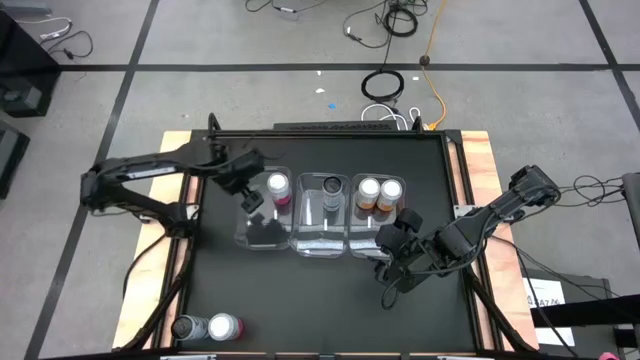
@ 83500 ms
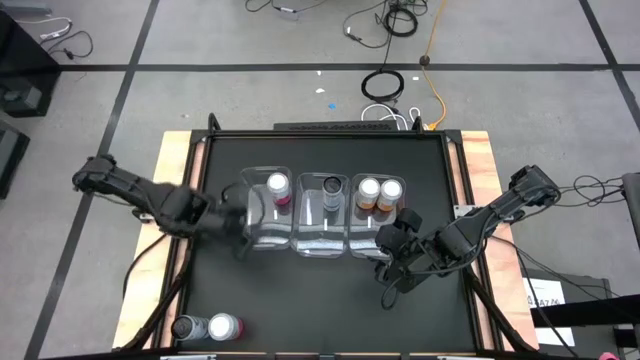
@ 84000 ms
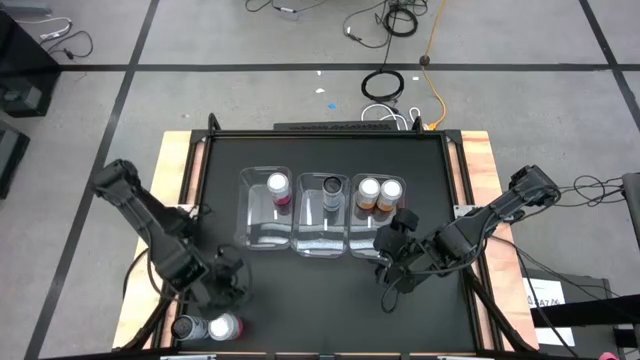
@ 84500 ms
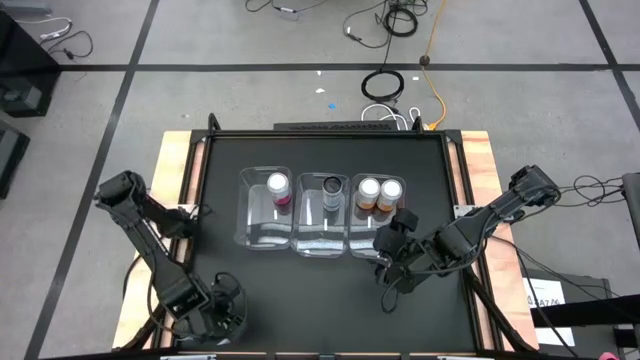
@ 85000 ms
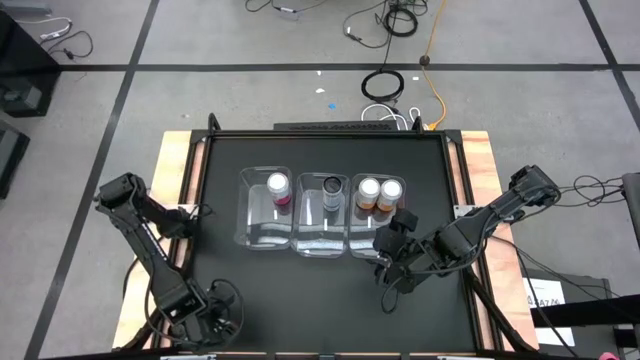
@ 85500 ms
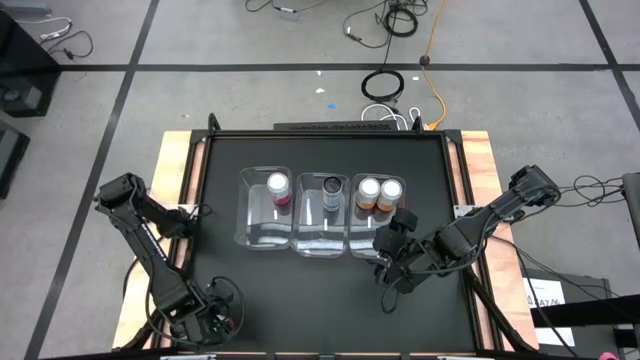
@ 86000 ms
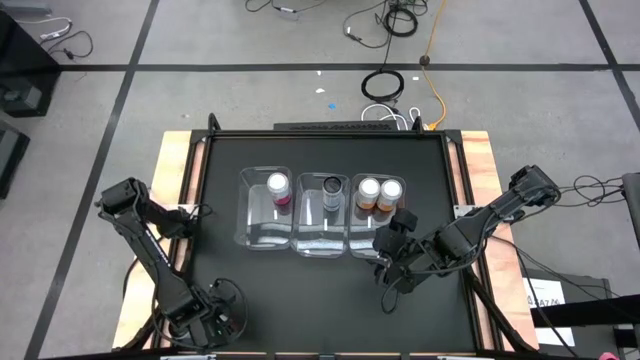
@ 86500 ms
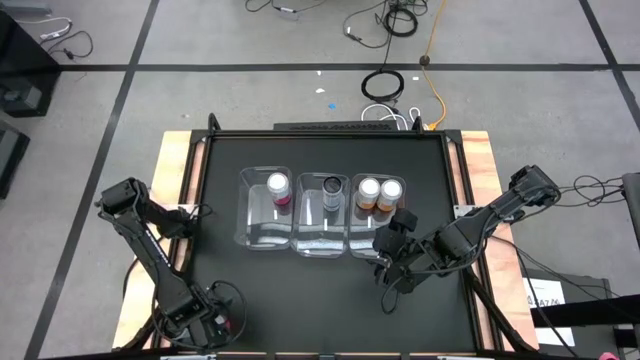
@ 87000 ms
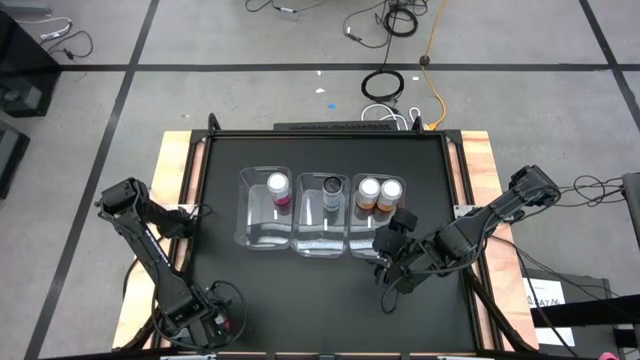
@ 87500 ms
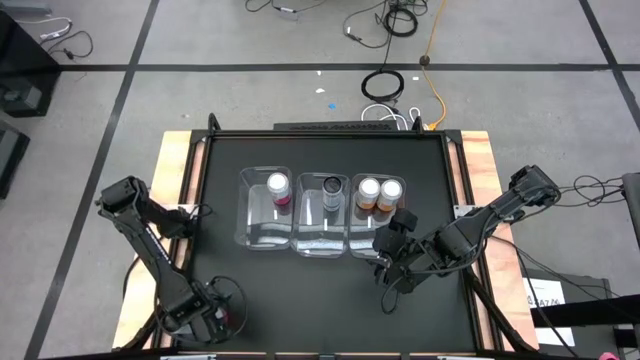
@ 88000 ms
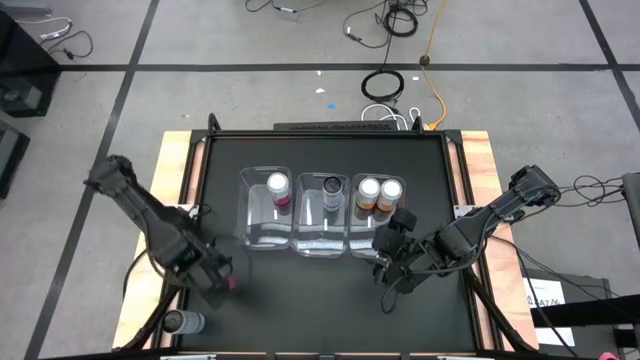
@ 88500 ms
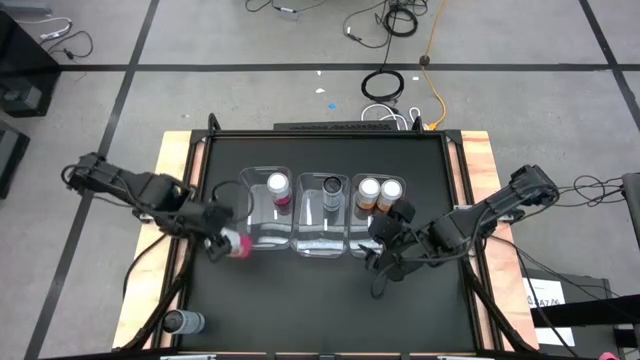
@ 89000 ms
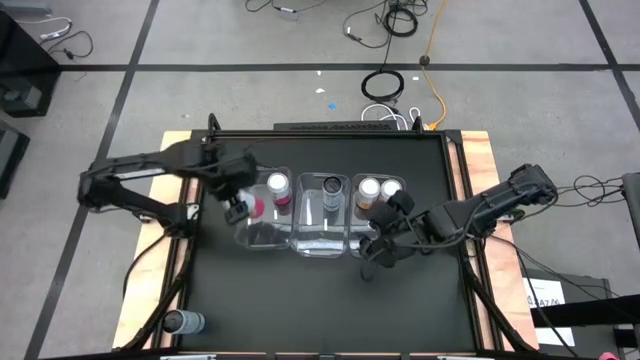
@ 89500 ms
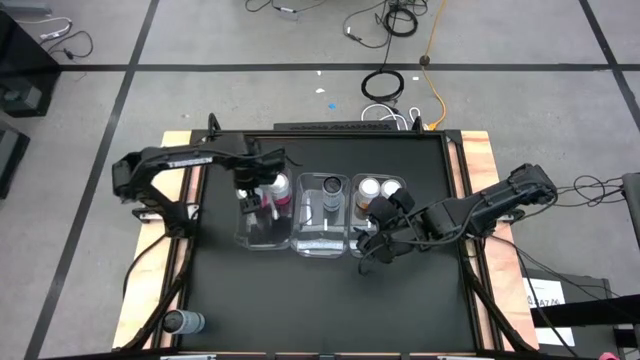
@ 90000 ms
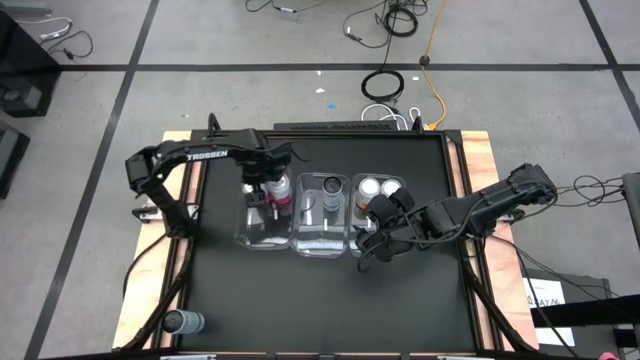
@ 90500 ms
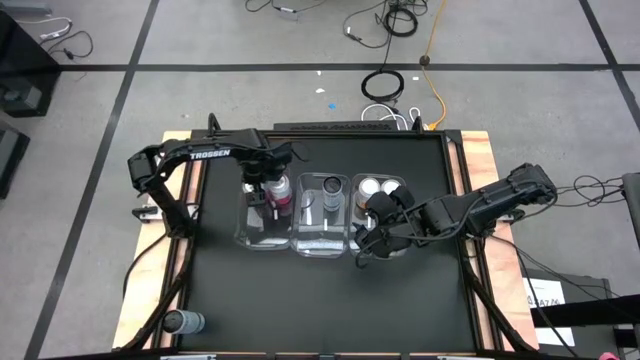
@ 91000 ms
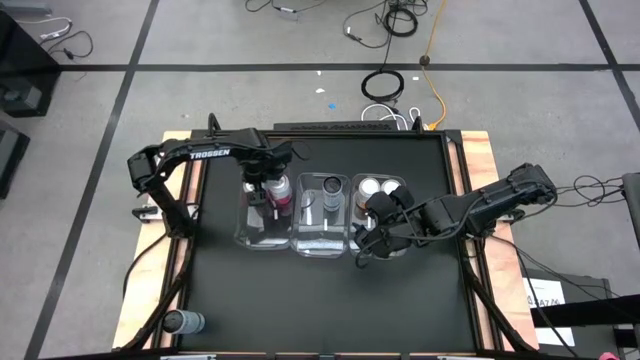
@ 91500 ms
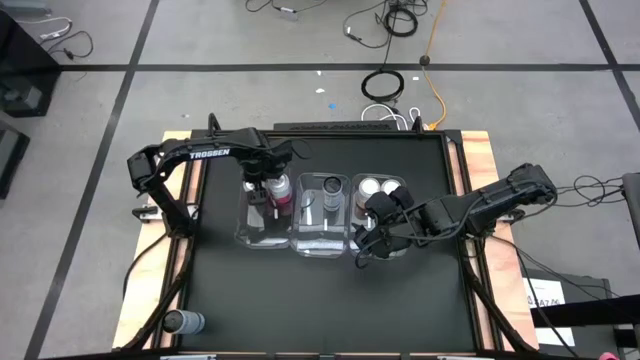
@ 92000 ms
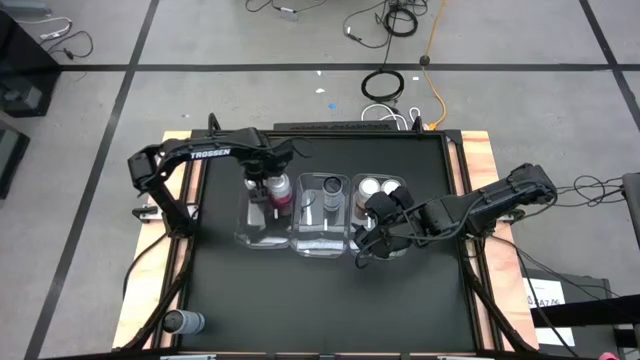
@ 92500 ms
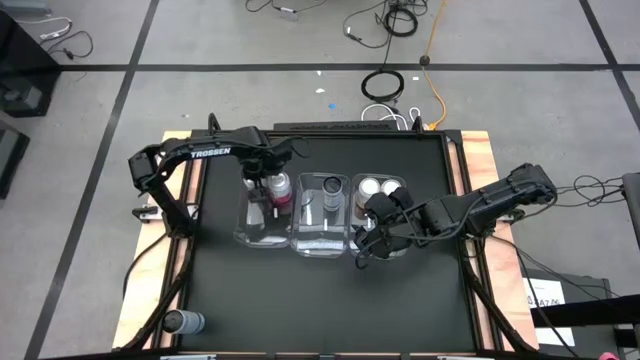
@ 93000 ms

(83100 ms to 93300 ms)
Task: Sort soda cans
Put the left pink-white soda can in the middle left transparent bin

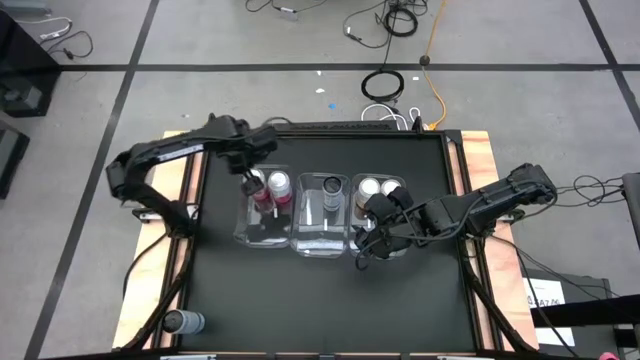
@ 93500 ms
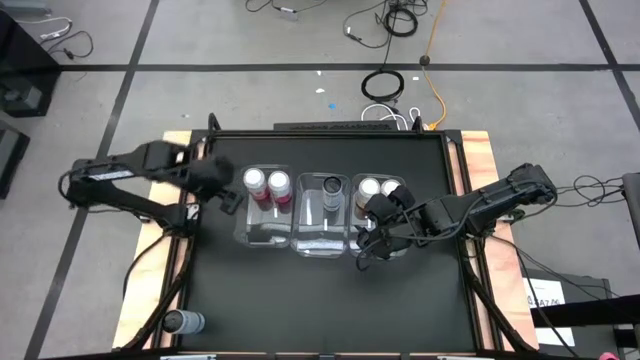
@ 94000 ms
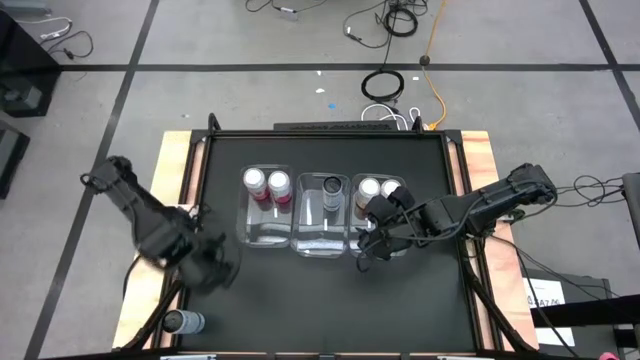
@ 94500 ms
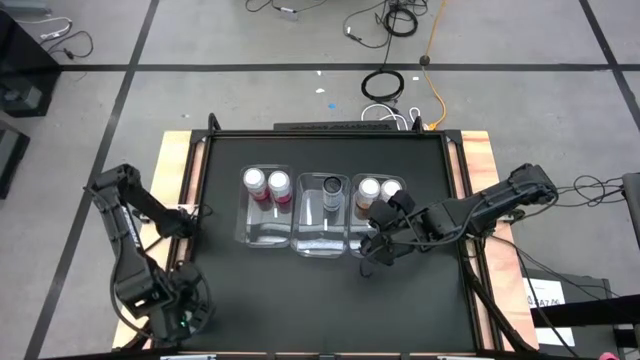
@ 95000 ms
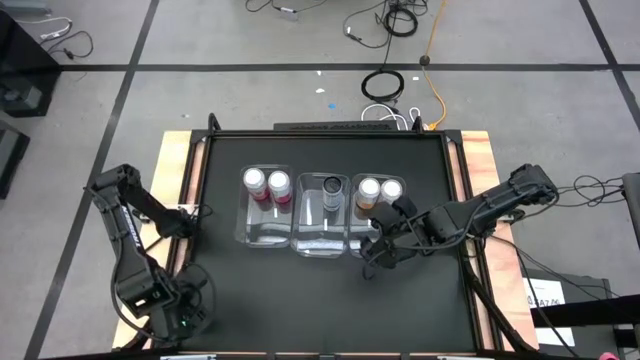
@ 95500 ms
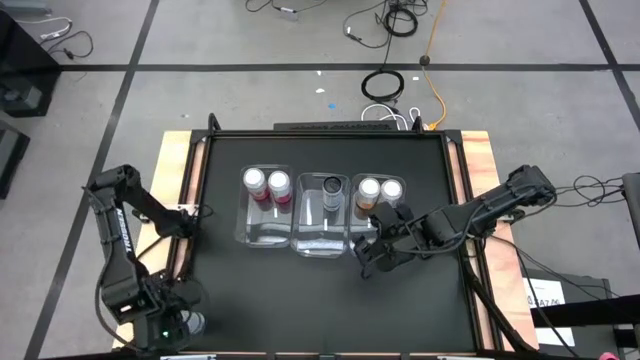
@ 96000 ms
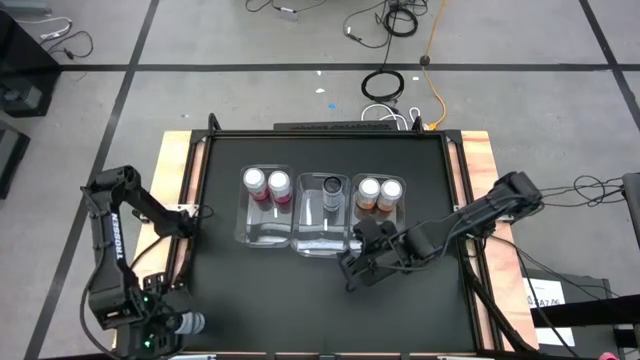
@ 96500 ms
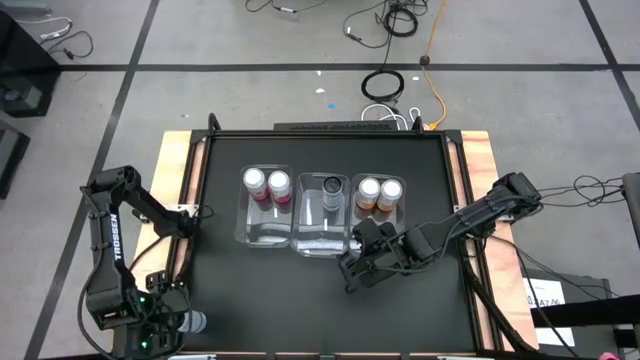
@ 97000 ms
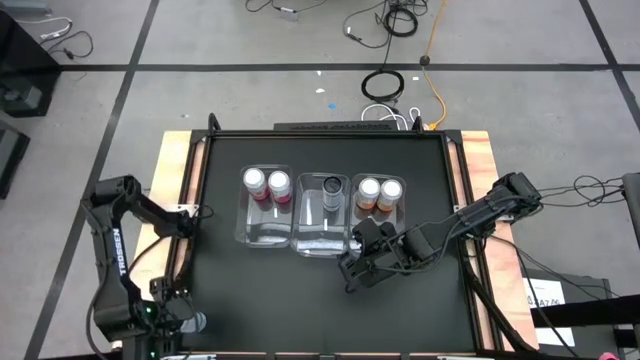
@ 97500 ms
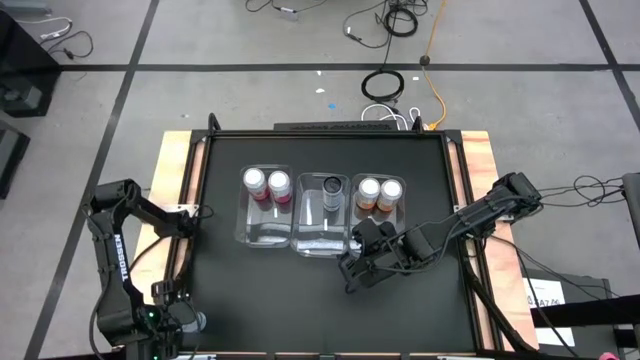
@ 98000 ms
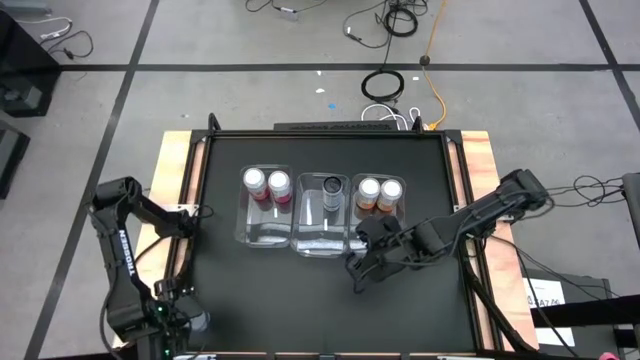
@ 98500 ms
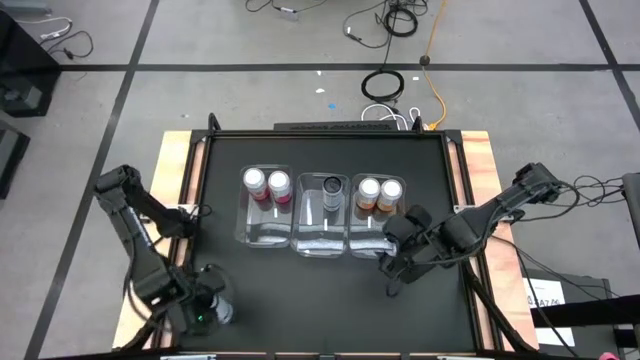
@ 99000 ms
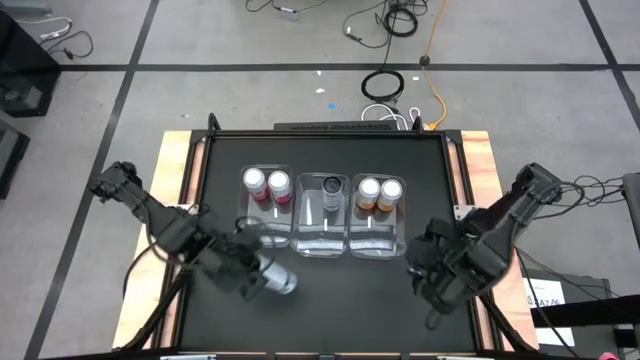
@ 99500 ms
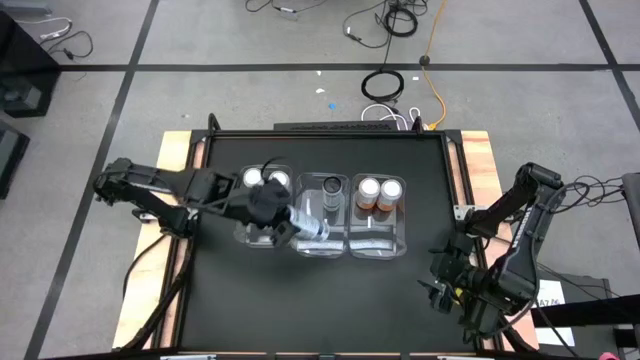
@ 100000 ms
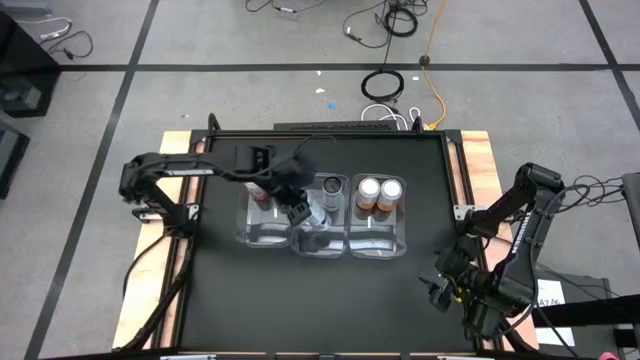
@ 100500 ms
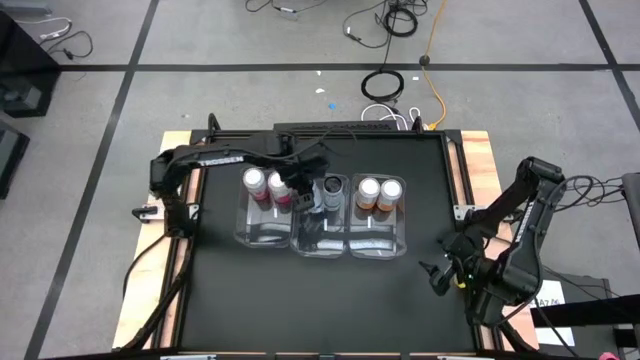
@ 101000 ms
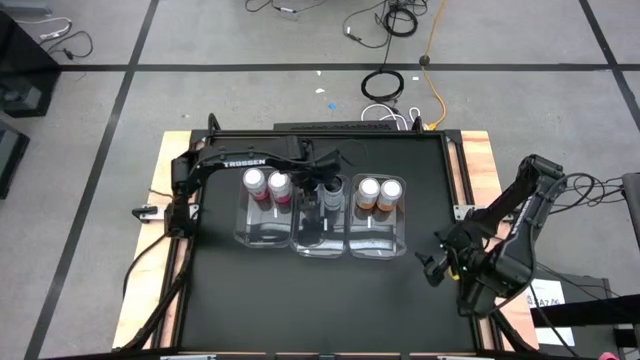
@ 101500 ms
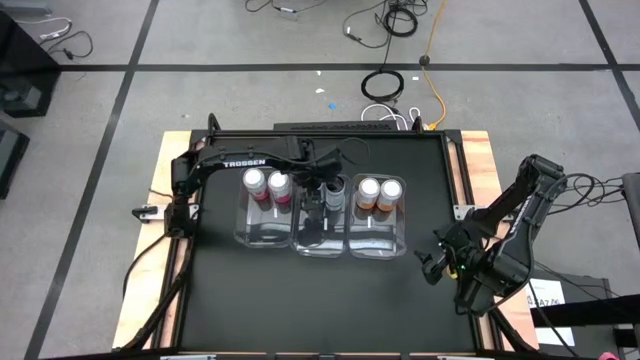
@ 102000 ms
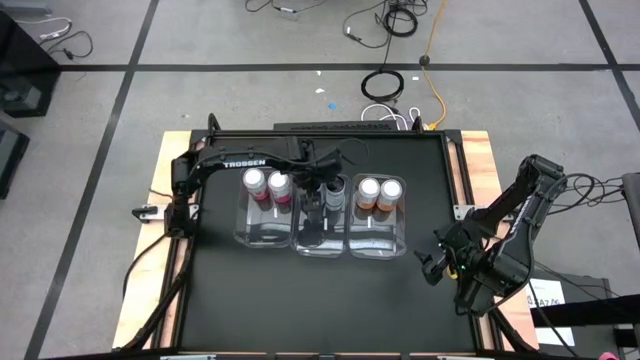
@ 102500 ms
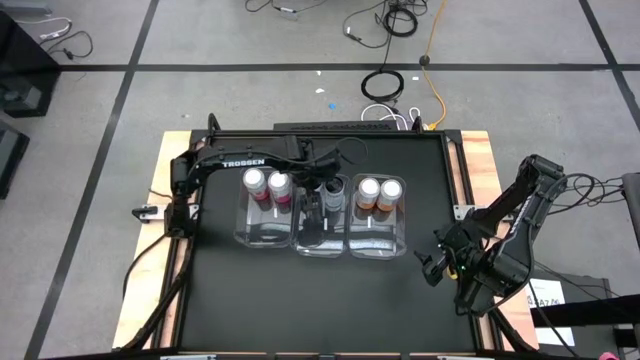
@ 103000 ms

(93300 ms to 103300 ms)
Put the left white and blue soda can in the center transparent bin

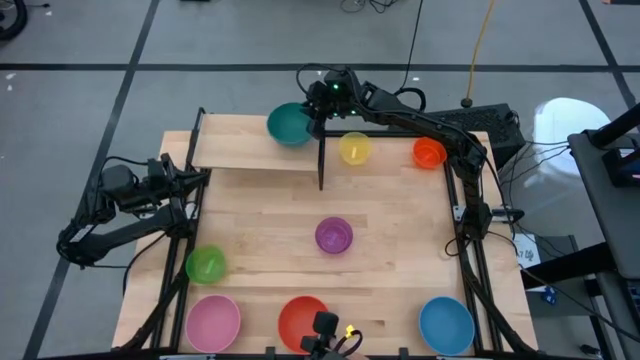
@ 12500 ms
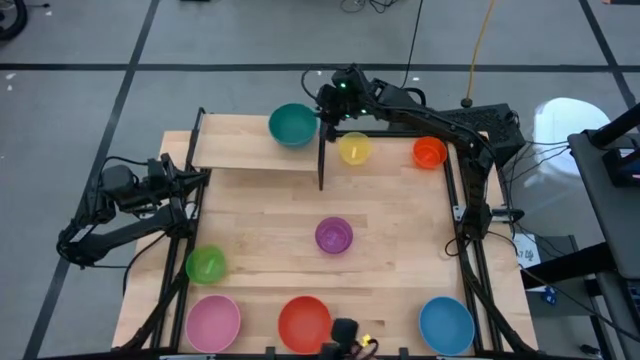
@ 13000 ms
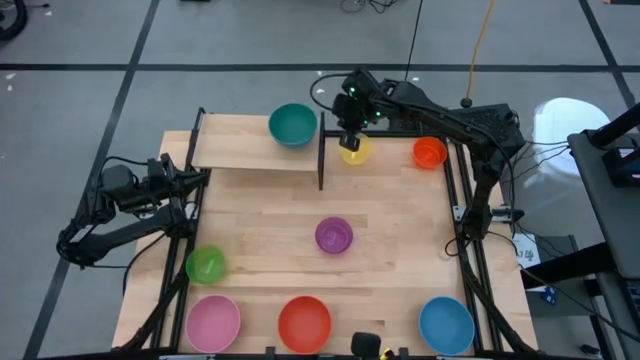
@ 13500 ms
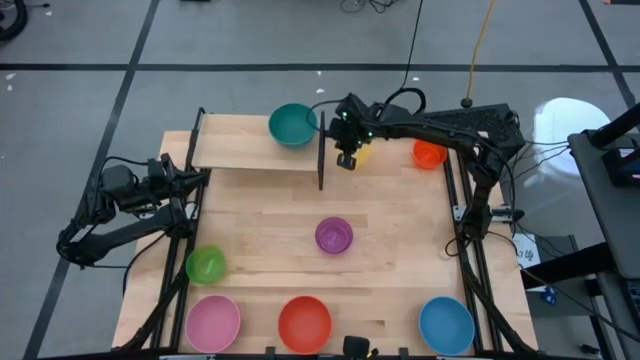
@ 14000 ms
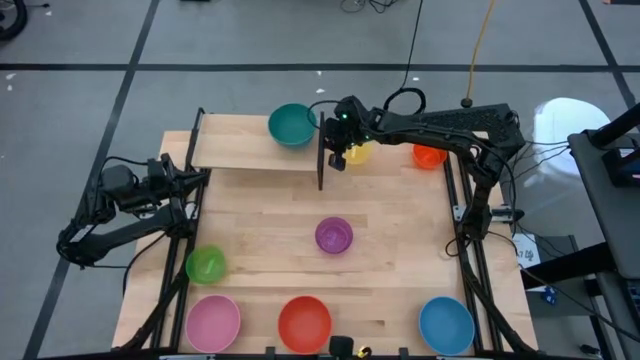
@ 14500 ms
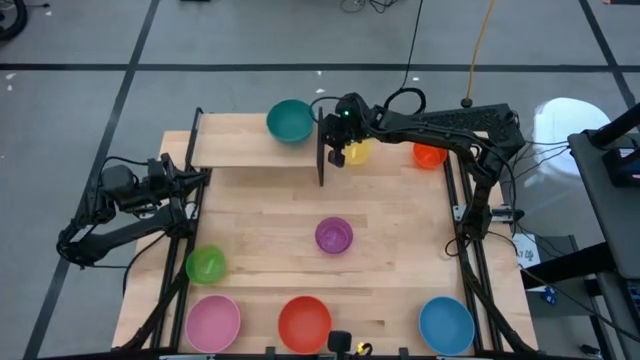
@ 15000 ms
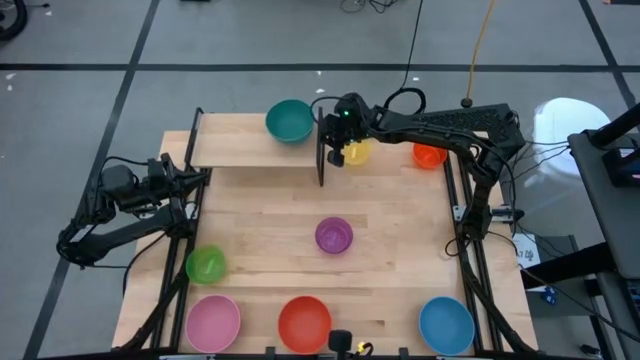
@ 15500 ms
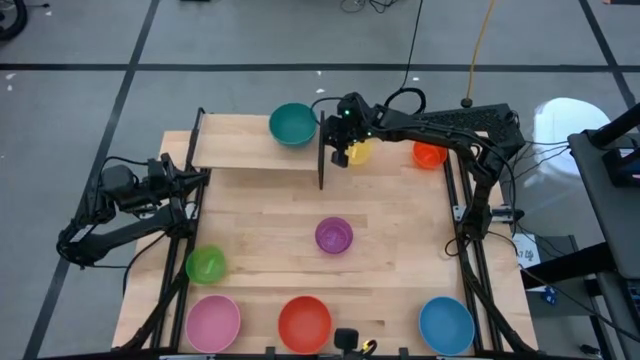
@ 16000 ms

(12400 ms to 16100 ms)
Task: Place and stack bowls onto a shelf
Adjust the shelf on the table
